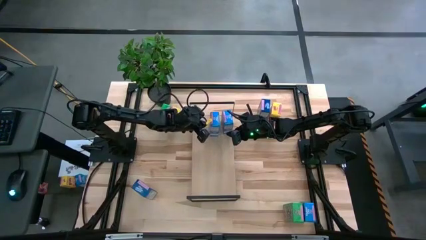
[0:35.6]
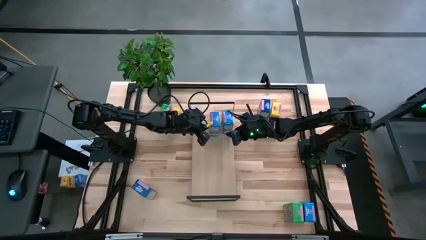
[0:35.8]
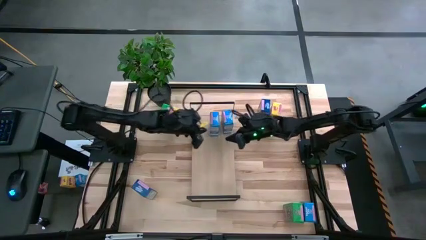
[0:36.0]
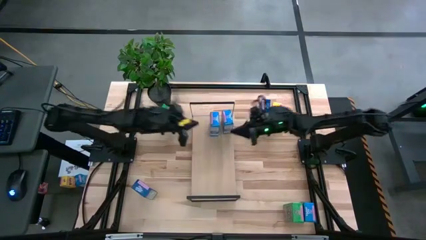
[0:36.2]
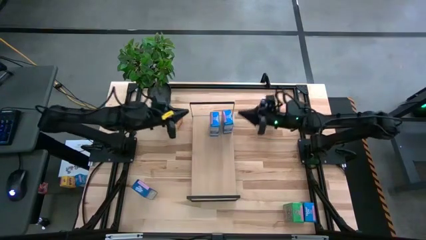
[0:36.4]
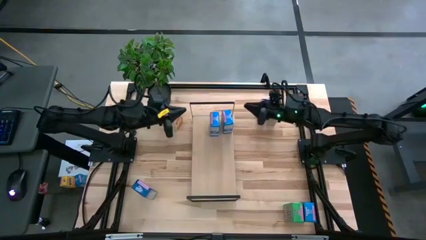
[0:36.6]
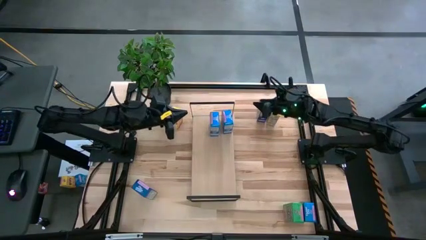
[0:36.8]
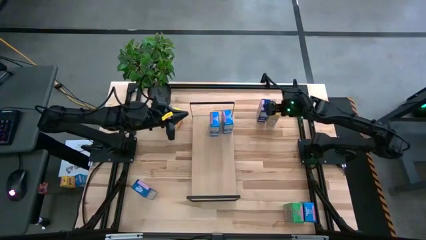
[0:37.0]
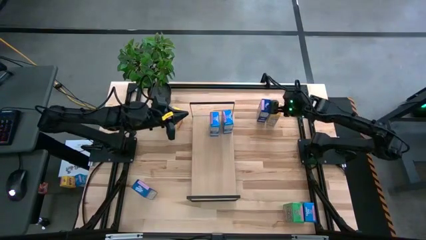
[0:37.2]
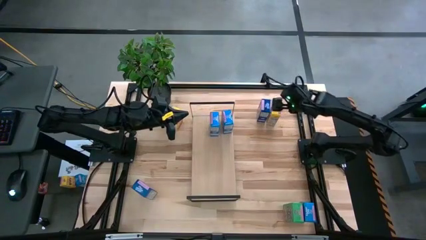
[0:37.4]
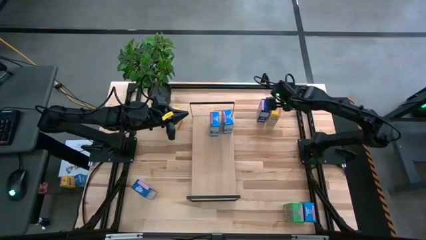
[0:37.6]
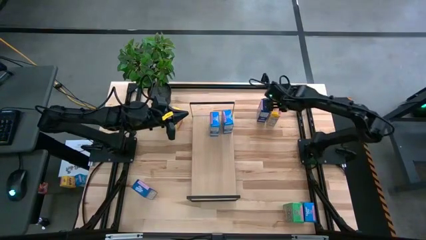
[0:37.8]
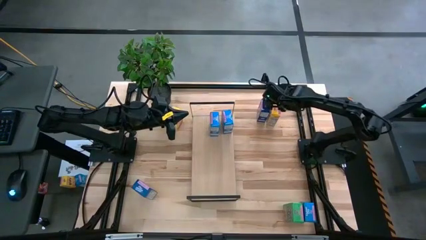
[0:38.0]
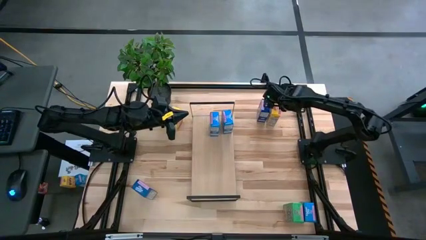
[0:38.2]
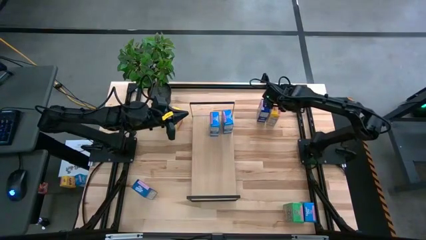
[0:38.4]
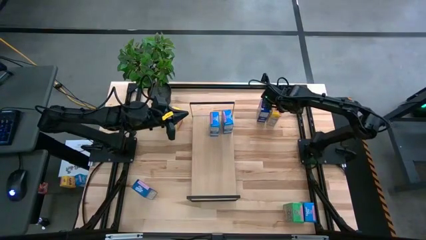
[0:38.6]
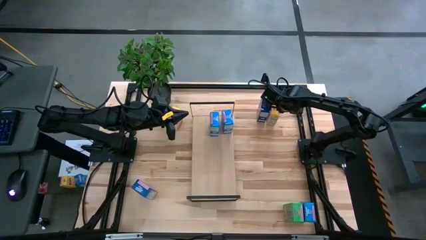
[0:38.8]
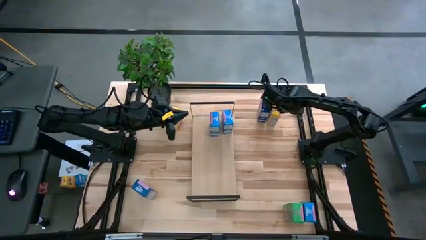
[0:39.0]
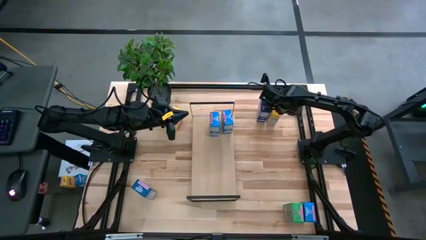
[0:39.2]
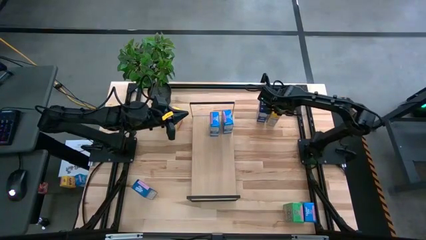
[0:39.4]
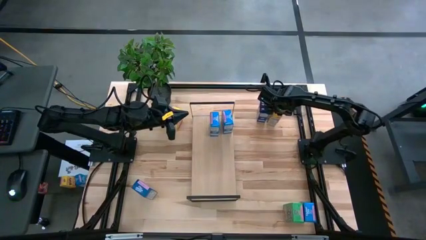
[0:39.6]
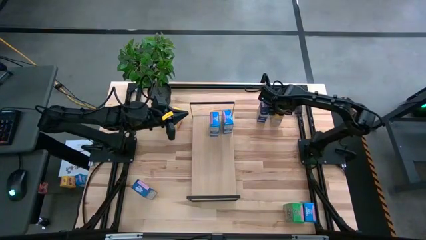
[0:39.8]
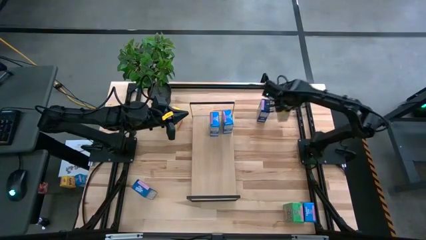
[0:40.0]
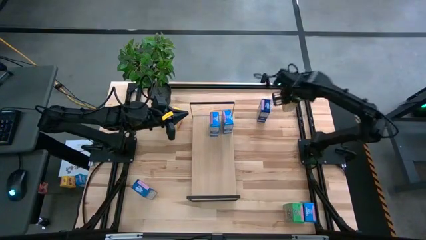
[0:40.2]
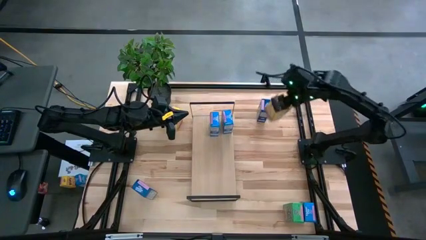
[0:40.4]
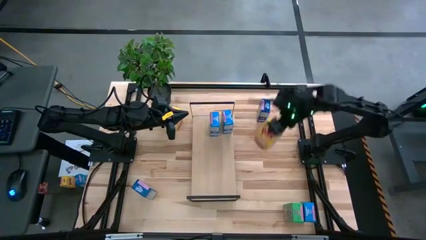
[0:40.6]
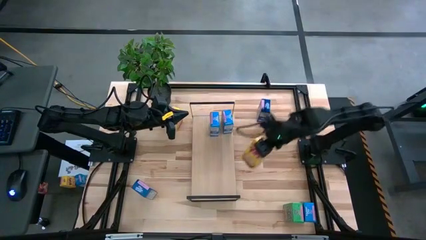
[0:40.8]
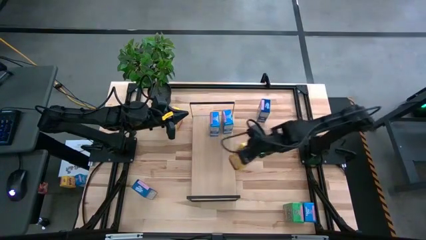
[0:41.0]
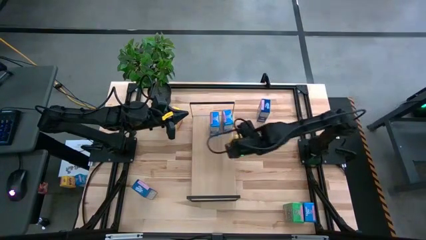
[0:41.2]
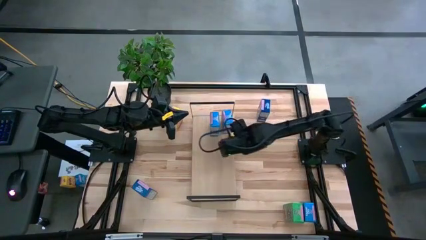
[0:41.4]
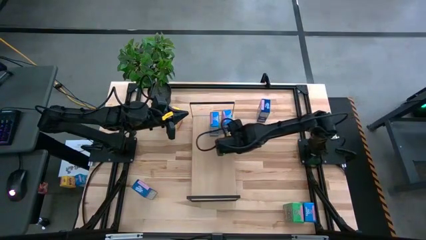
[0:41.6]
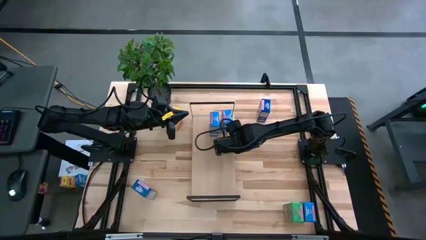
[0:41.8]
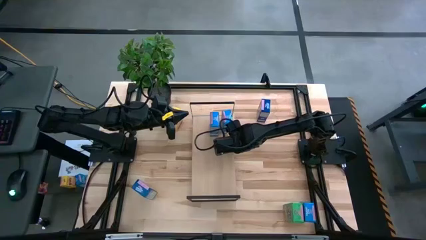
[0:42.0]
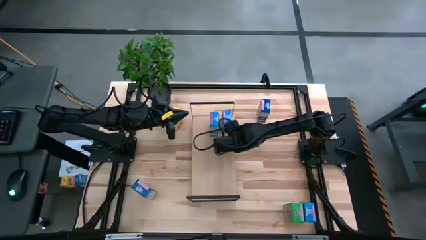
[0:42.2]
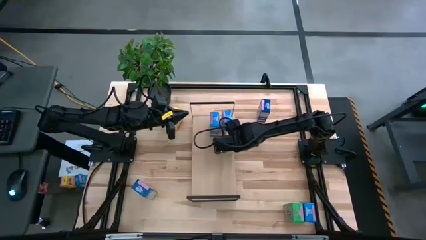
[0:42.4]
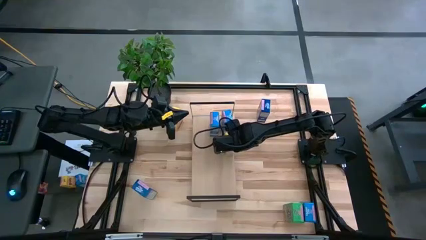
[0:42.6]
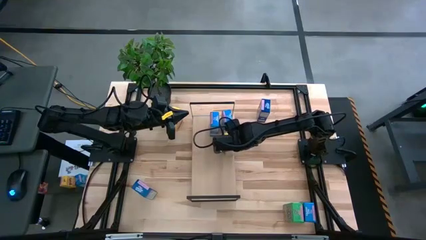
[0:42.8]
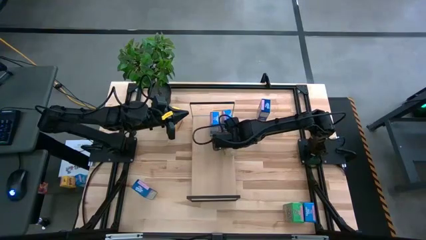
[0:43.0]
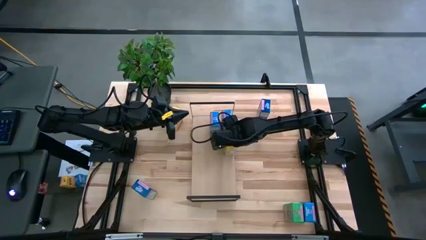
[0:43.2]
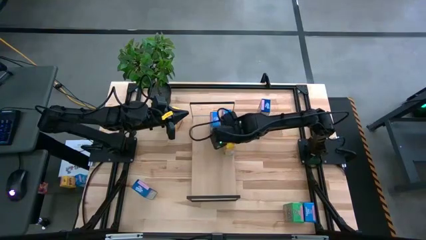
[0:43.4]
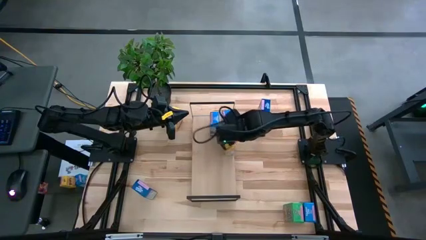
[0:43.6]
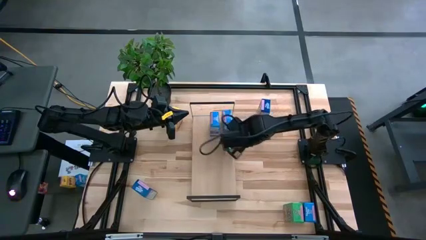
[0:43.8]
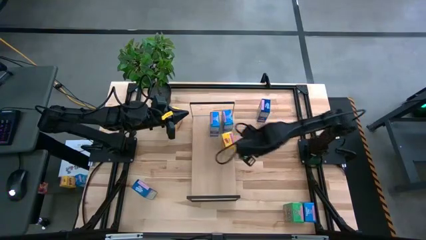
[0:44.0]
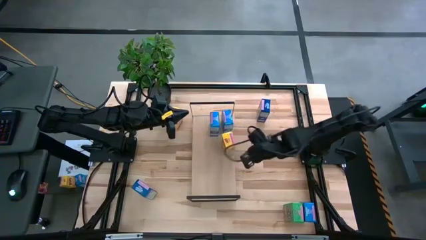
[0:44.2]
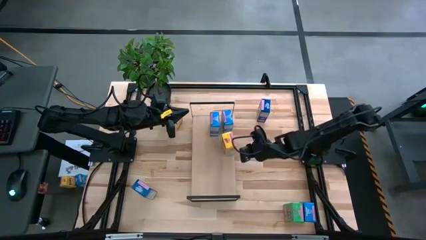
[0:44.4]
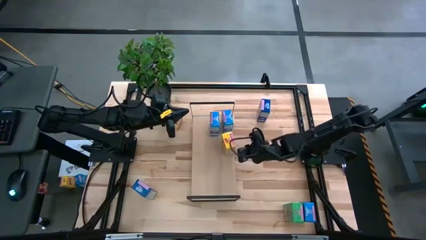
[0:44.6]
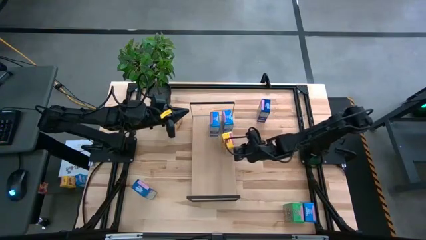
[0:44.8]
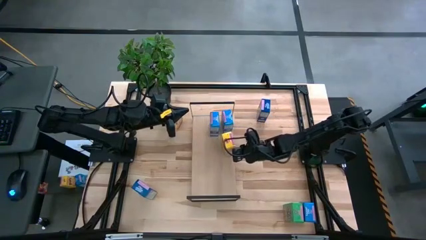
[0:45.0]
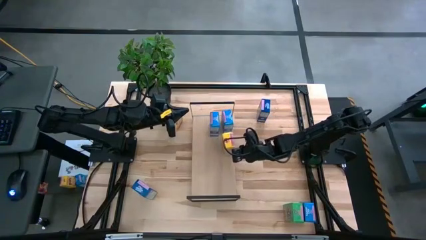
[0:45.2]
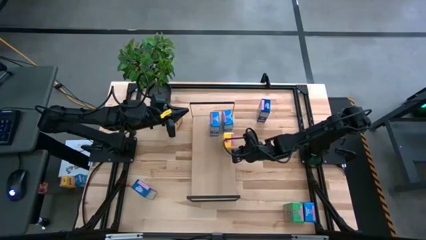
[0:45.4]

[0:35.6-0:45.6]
Task: Stack cereal on shelf
Put the right yellow cereal box on the shelf

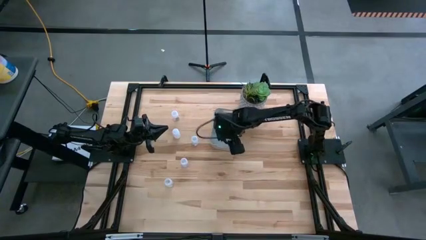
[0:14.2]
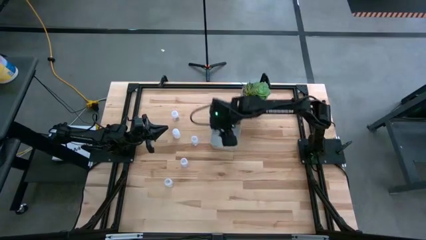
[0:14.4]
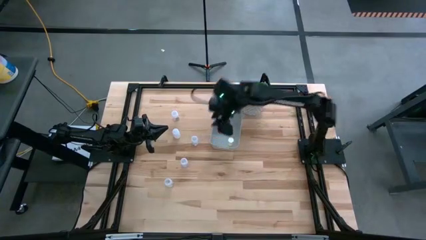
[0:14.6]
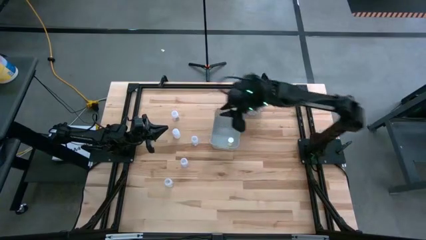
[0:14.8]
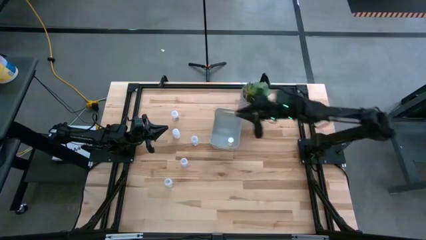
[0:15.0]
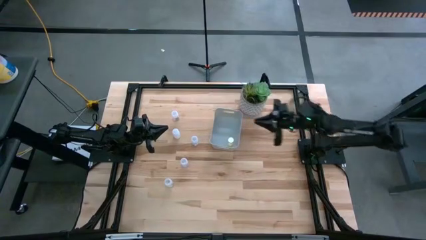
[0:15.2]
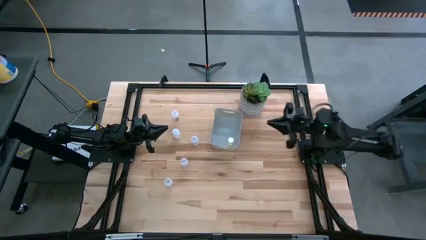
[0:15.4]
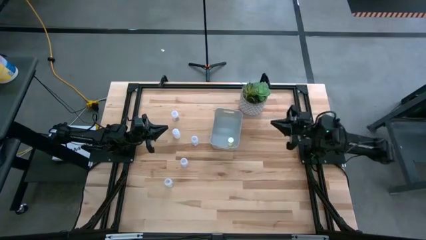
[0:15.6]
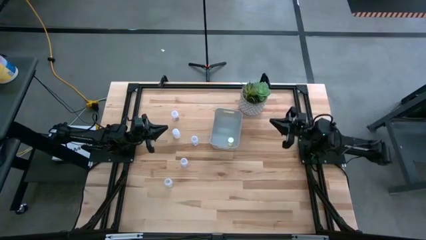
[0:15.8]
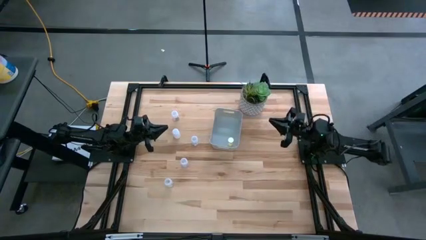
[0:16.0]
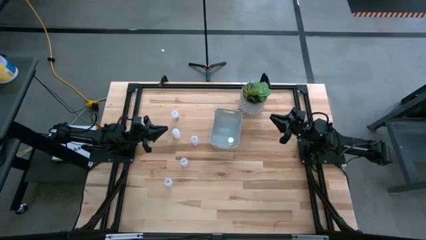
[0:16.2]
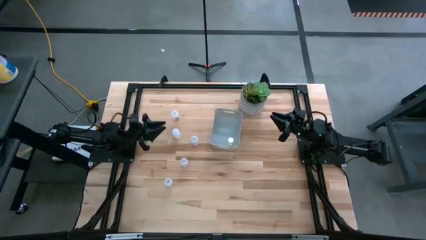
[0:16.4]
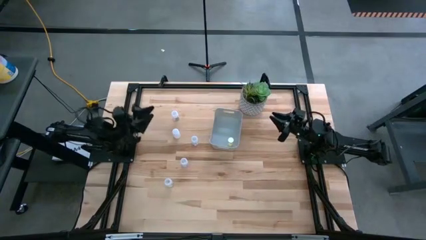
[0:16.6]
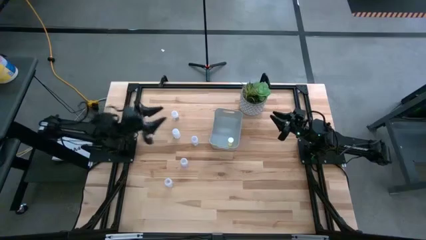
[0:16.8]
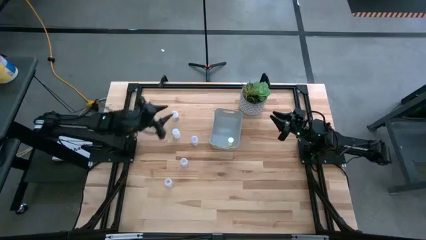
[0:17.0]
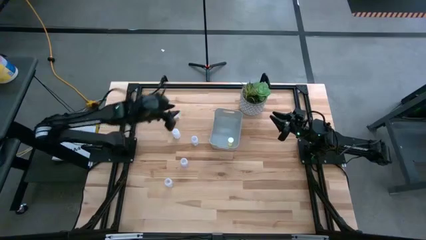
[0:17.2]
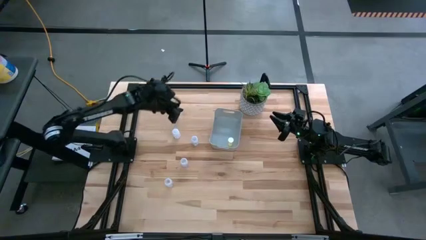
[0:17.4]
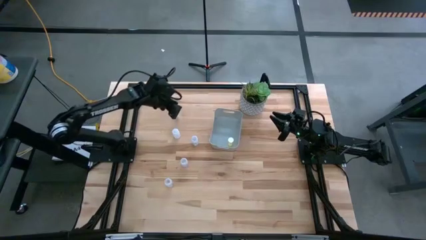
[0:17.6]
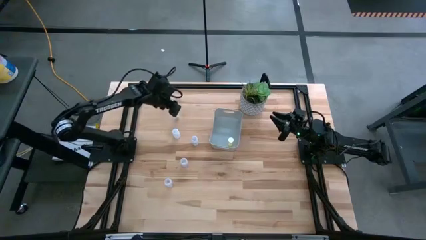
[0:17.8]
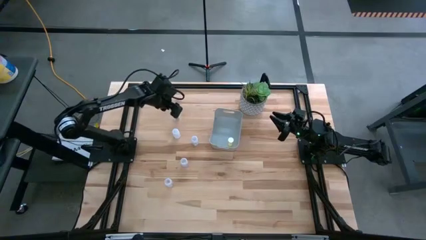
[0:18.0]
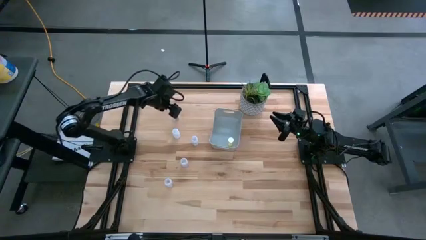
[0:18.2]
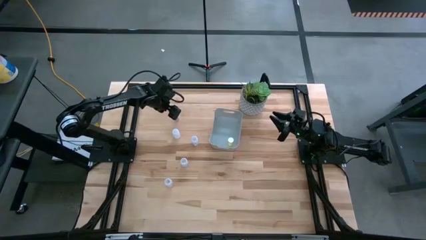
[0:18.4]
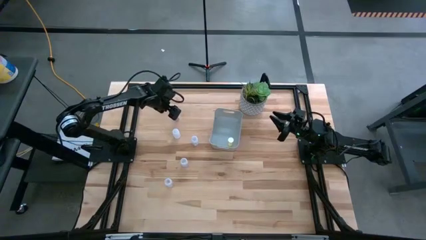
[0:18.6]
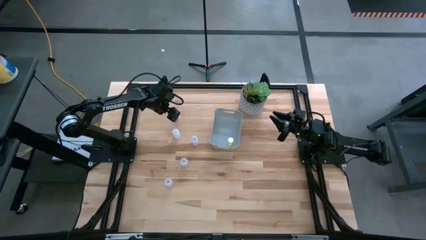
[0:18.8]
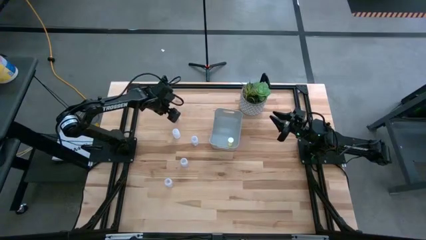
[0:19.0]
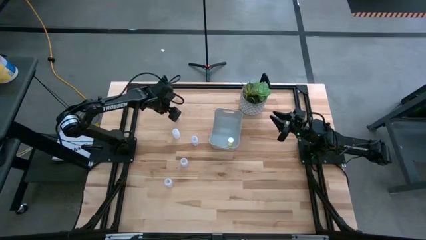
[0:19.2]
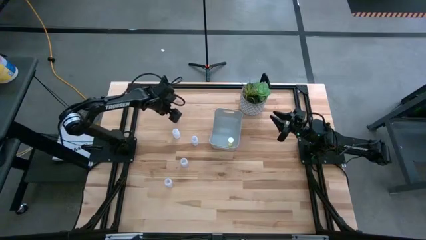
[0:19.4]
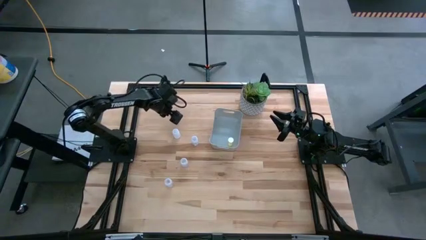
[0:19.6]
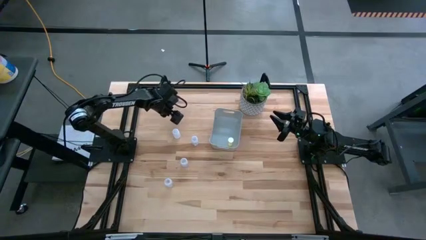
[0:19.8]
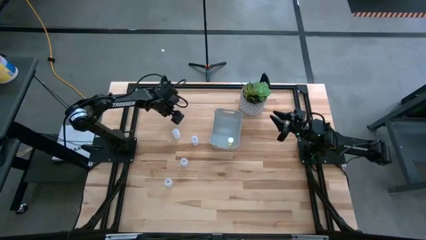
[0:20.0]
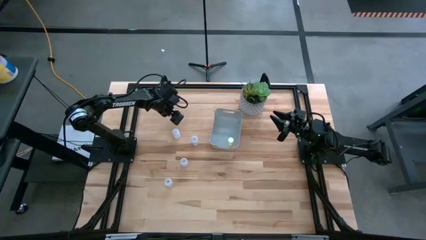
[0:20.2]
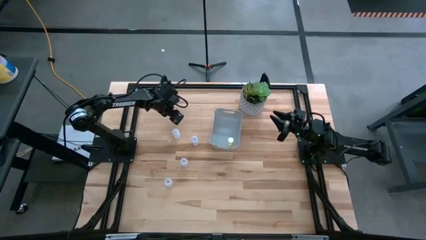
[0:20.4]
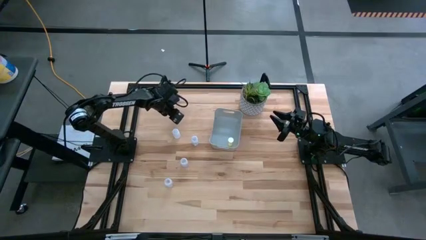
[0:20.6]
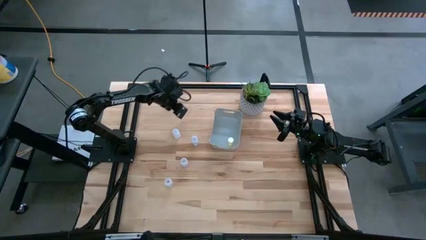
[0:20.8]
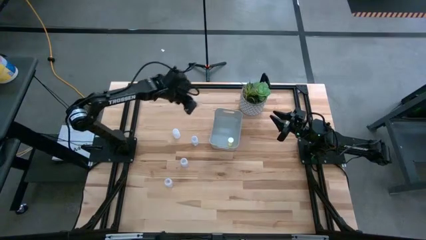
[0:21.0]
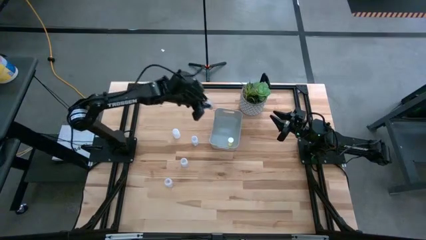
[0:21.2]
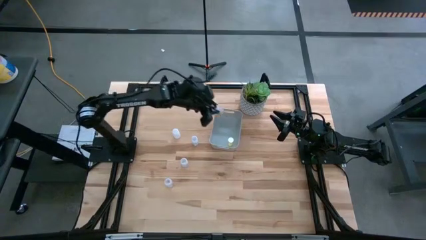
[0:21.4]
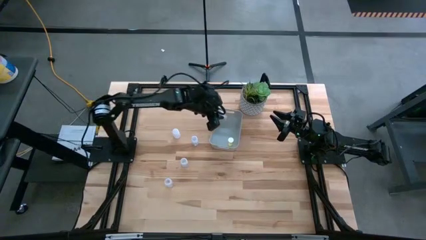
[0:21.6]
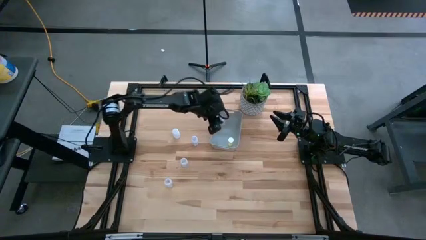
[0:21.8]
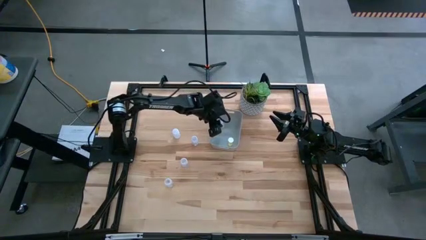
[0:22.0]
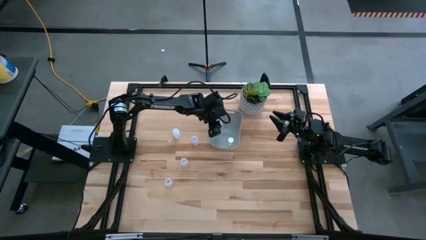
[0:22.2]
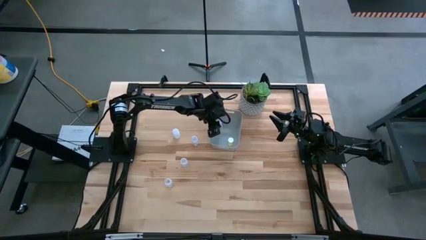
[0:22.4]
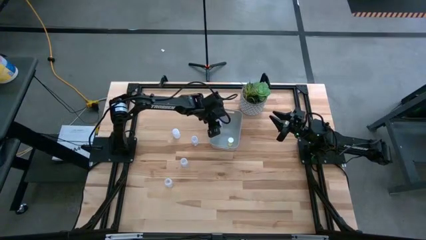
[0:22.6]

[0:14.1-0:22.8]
Task: Pick and place pill bottles into a basket
Put the transparent pill bottle into the white bin
